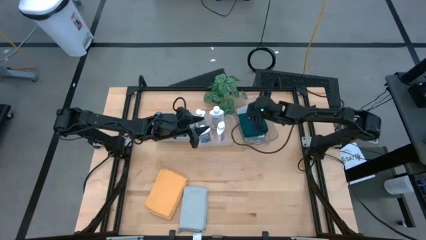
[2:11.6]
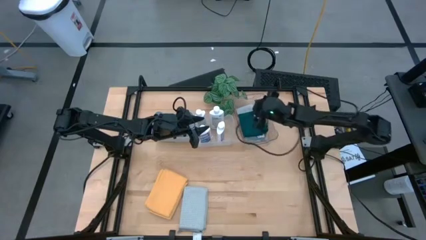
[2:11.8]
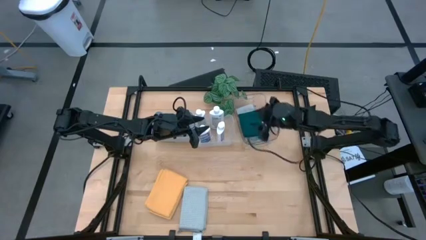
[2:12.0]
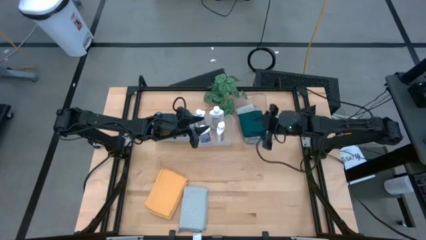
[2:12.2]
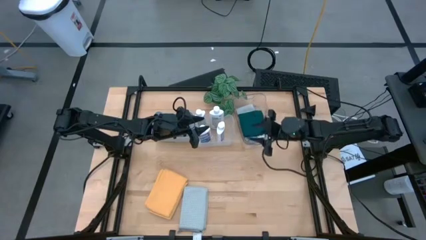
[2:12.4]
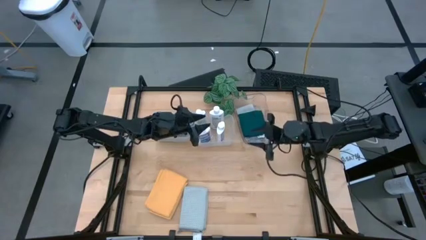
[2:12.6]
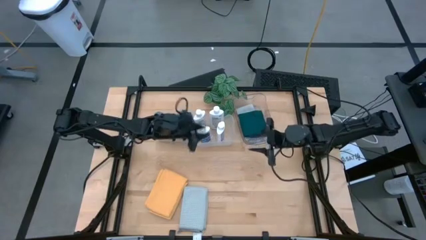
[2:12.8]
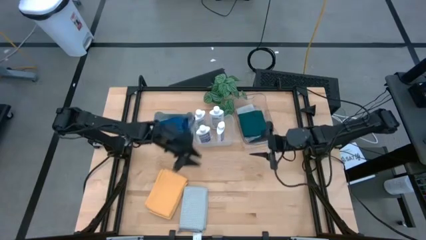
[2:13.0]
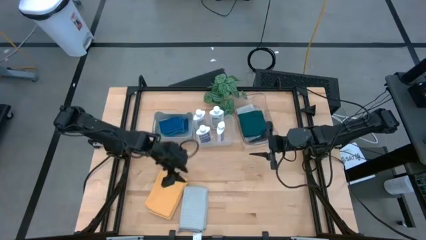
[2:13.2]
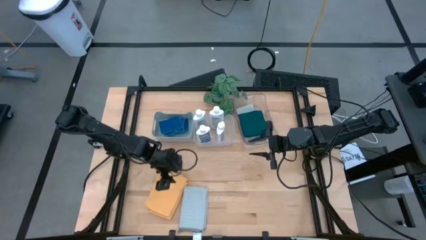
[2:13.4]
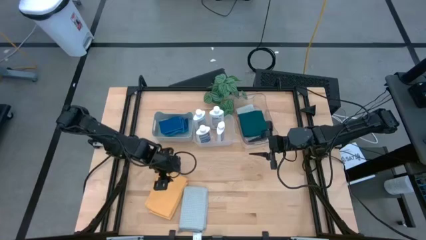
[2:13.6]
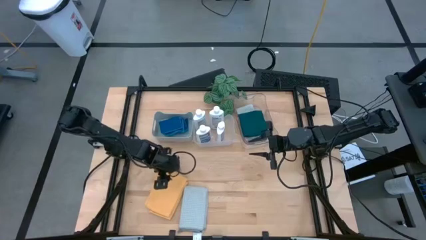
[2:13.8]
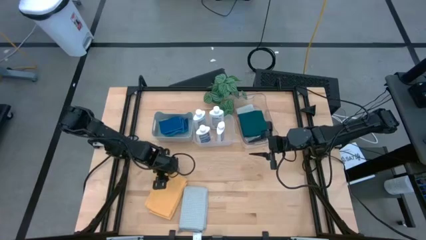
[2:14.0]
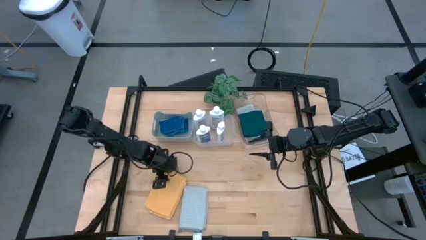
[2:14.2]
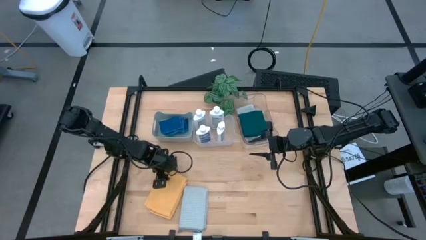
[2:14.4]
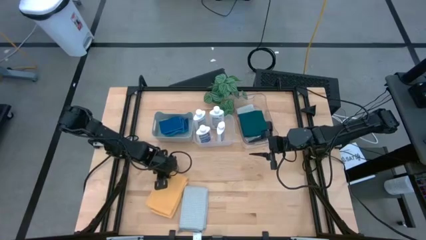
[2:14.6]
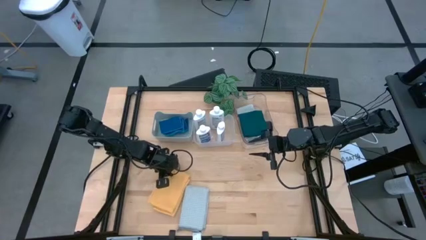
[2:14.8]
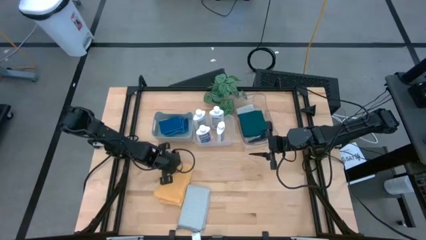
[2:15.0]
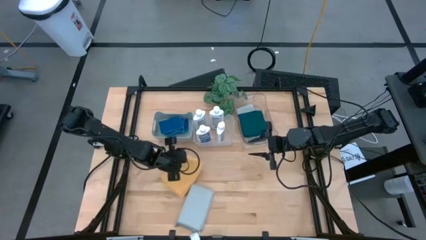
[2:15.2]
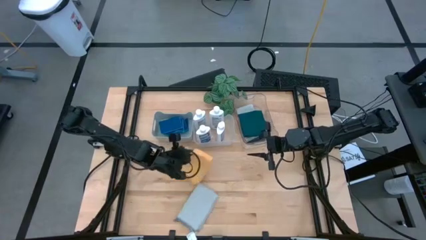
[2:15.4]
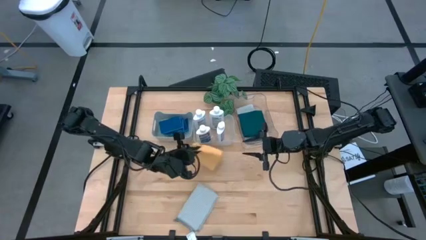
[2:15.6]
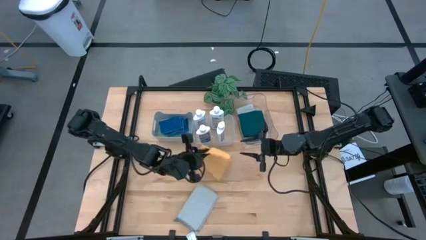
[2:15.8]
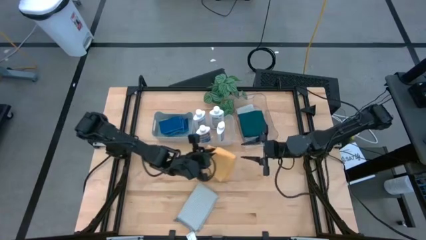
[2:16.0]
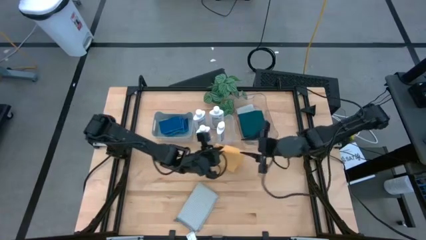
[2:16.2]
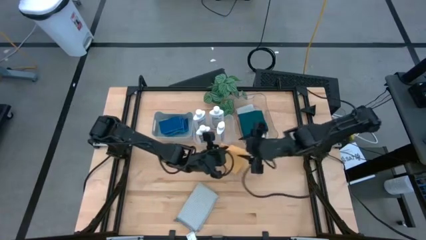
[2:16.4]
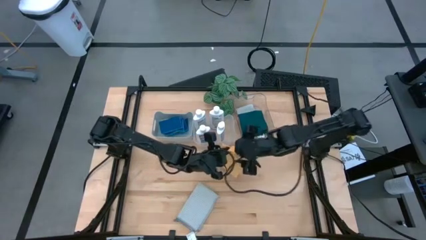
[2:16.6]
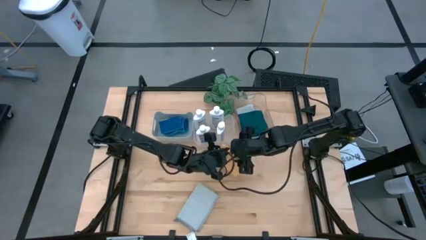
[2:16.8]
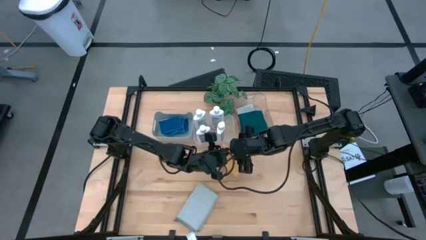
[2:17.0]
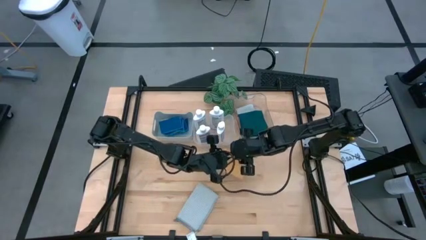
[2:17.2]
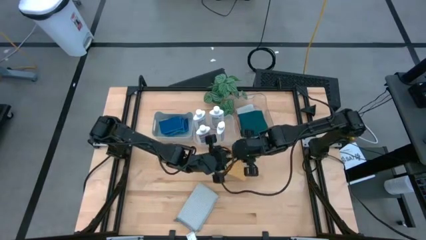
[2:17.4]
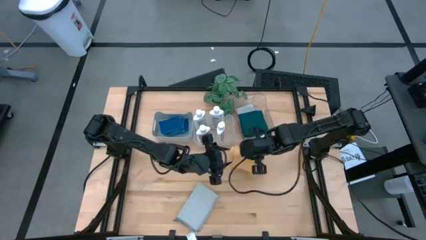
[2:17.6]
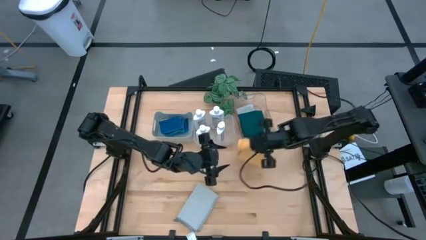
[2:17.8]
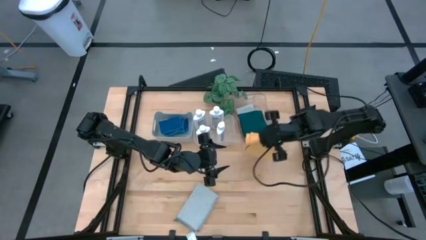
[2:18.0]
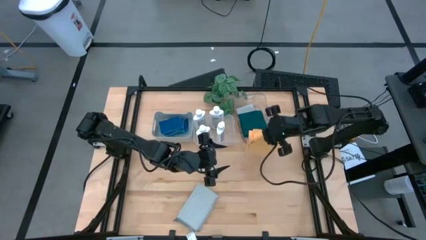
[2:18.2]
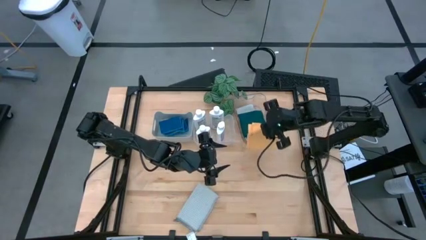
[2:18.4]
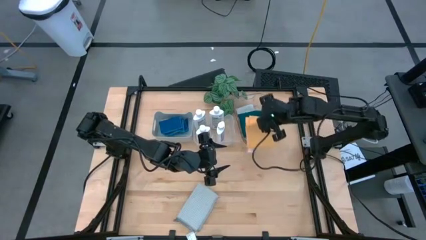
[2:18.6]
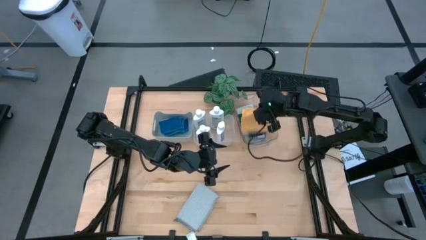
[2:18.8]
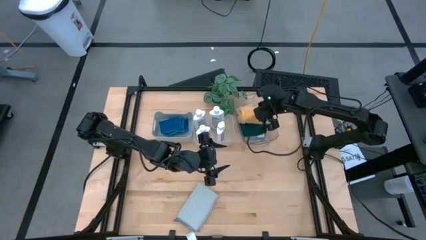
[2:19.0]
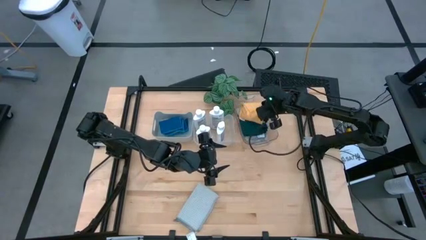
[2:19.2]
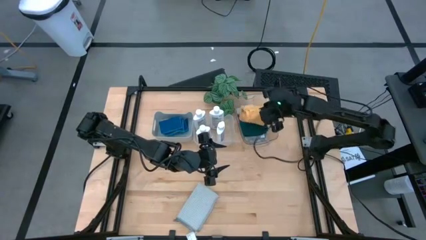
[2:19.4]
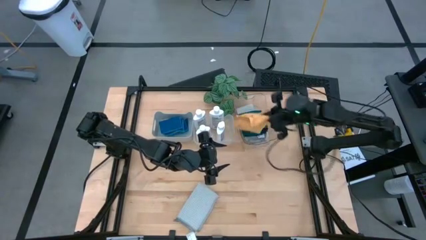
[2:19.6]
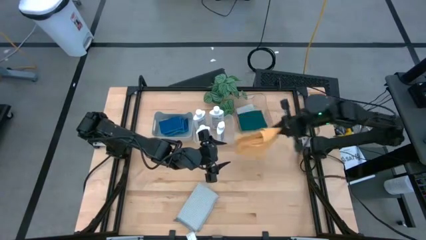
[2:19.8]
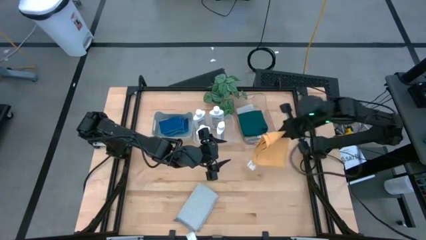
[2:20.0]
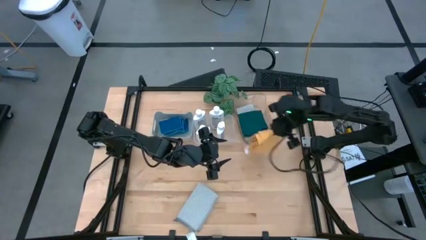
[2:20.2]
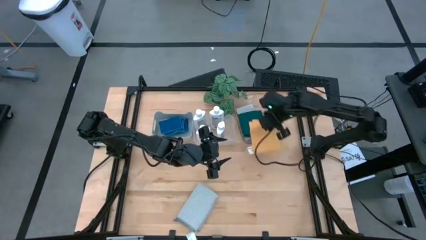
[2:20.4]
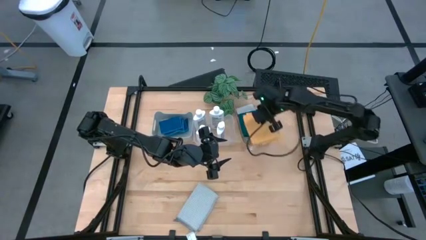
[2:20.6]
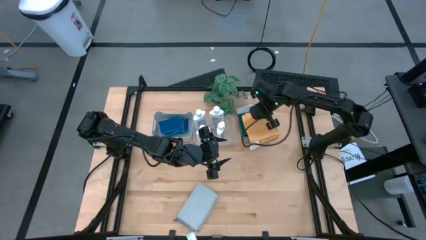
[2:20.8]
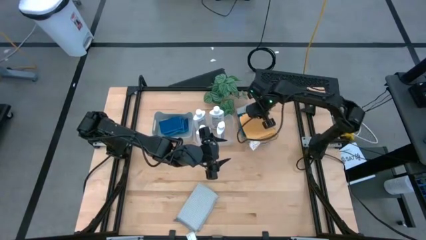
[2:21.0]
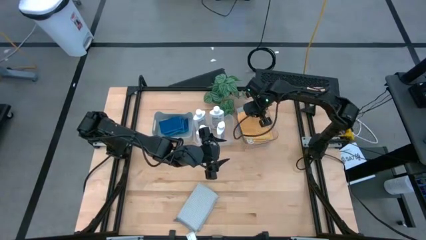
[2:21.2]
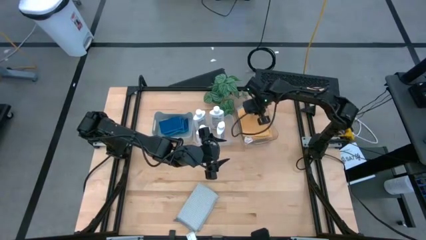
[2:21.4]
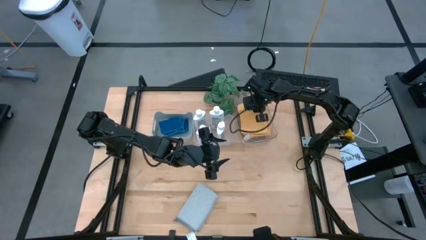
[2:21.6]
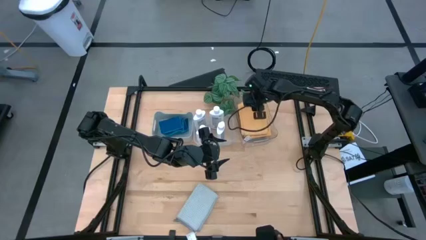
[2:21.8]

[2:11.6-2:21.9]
Task: Pick & Place Kitchen Items
Put the orange towel into the transparent bin

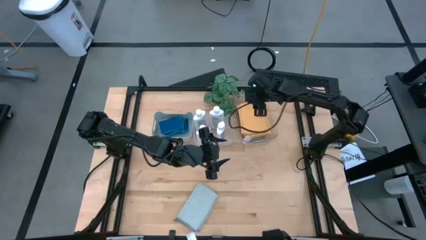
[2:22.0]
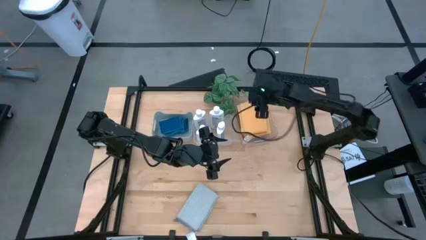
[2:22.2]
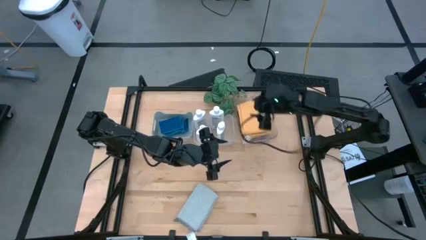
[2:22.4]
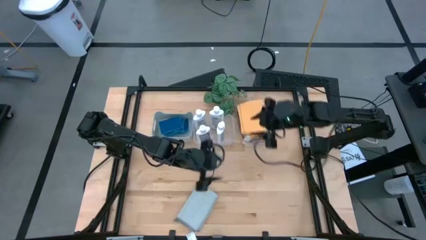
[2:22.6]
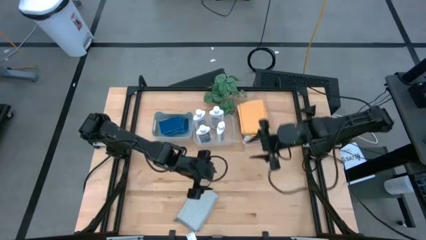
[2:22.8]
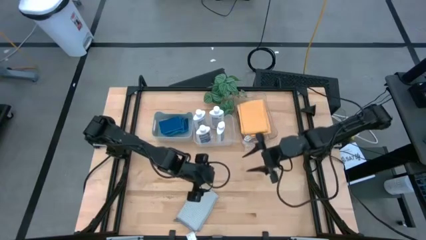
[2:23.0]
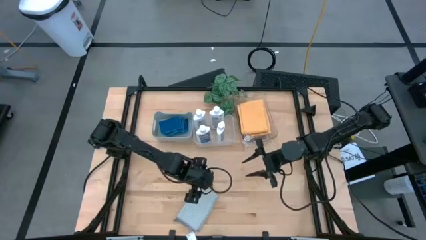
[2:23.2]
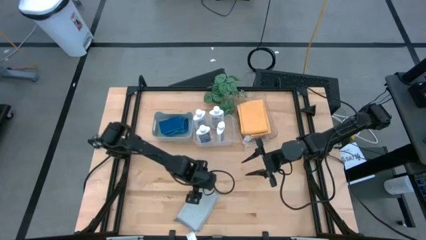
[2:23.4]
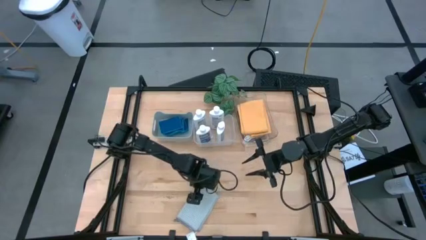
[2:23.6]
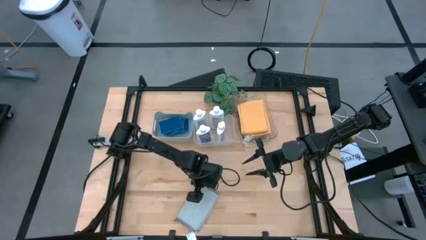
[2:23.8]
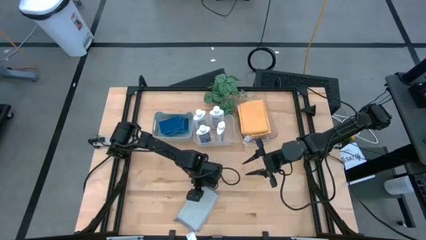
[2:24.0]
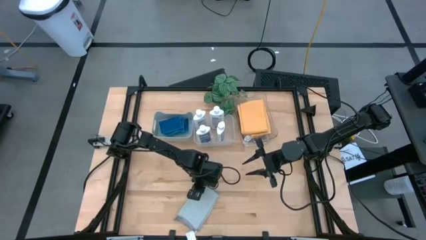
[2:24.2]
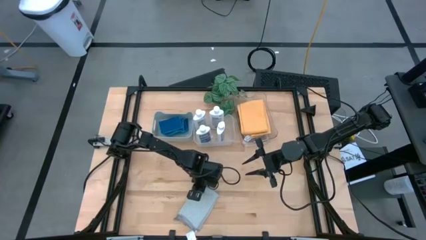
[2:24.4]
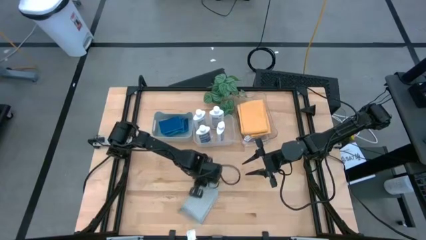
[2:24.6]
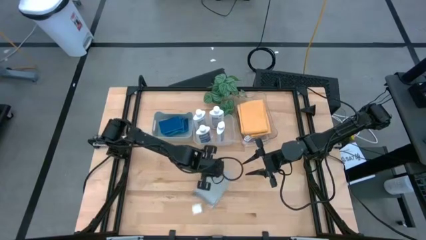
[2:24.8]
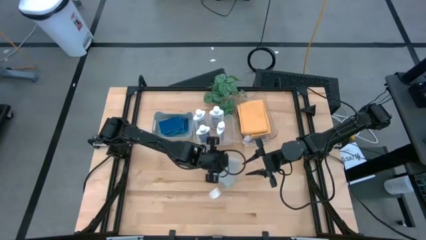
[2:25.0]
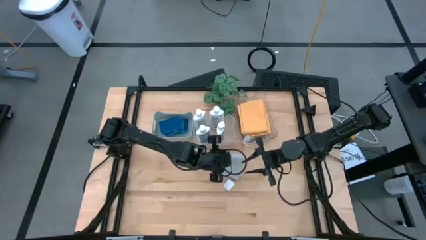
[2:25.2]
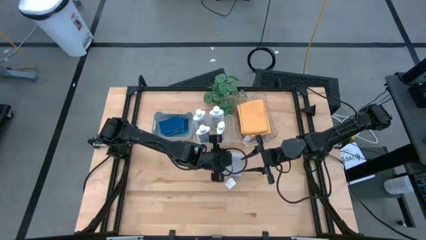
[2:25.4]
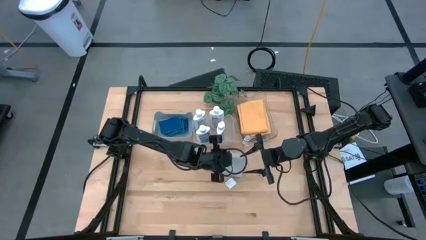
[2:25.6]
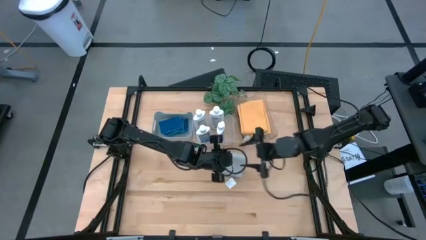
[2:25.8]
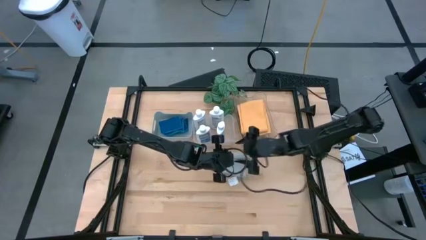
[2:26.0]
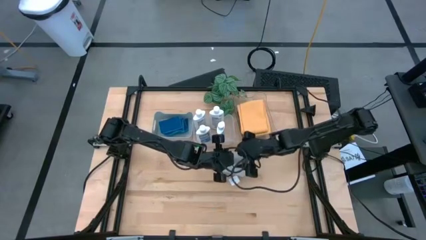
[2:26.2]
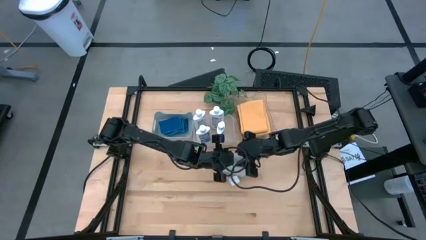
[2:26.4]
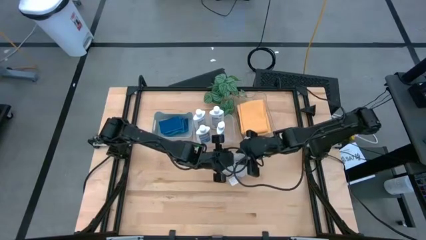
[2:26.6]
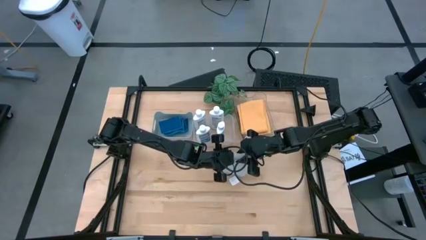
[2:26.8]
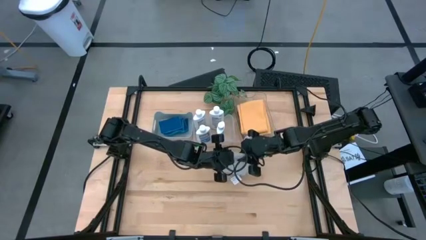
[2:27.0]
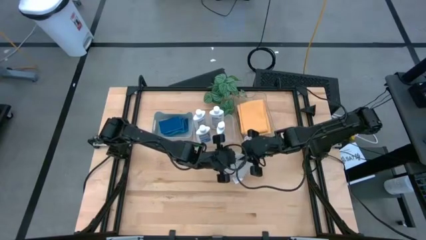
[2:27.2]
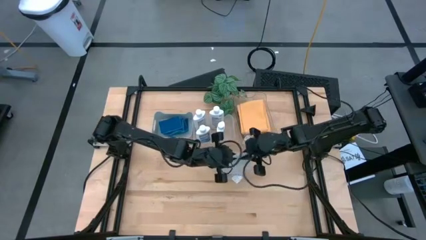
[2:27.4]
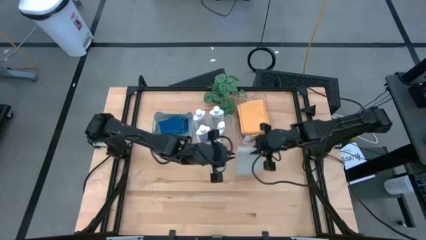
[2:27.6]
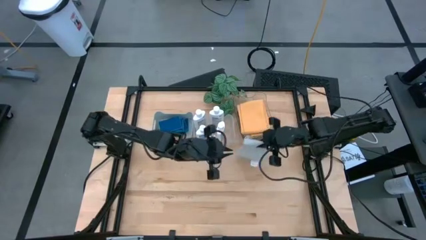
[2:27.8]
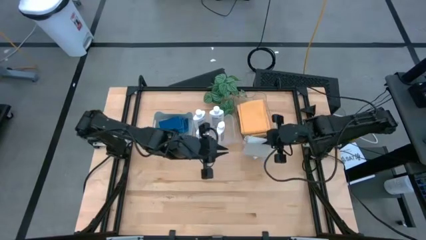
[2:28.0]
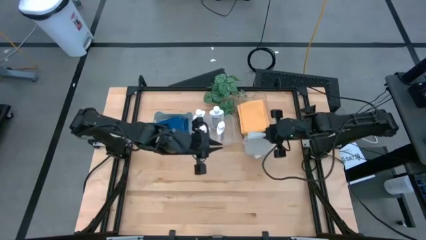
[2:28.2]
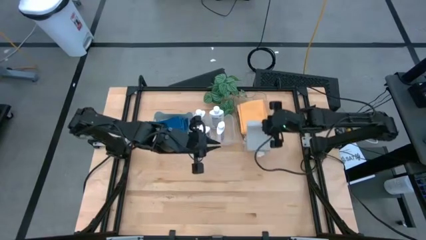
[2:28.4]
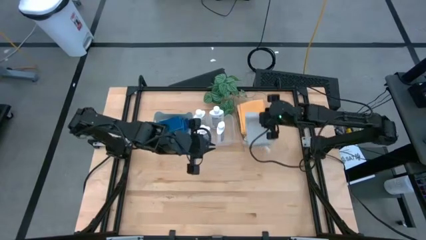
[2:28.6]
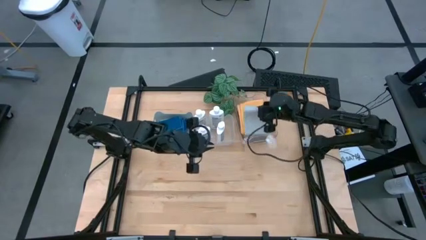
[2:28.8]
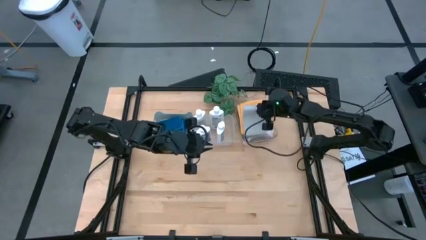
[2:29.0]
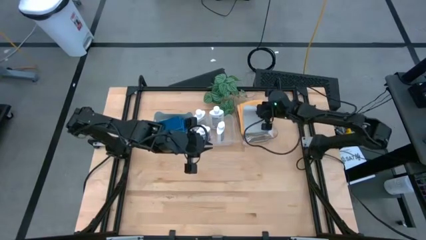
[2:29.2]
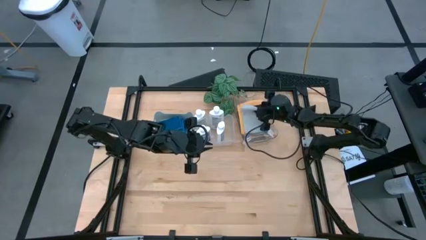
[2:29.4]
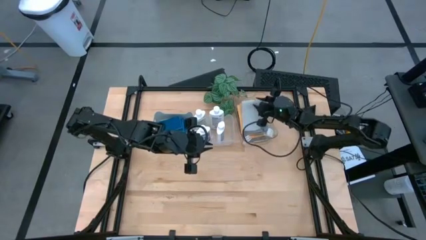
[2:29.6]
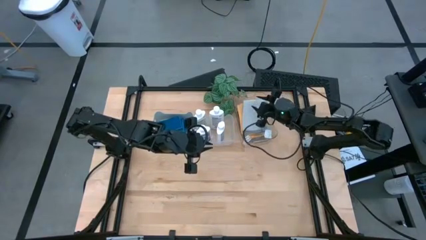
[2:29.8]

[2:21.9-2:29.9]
Put the gray towel into the transparent bin
